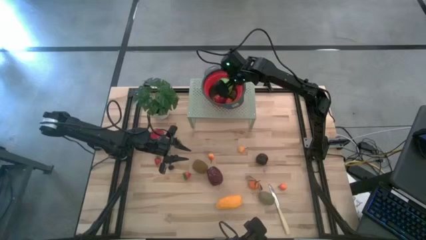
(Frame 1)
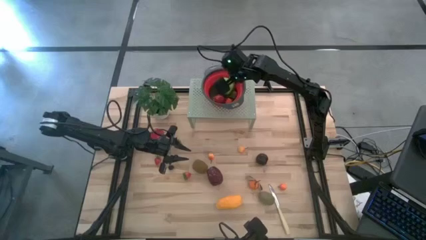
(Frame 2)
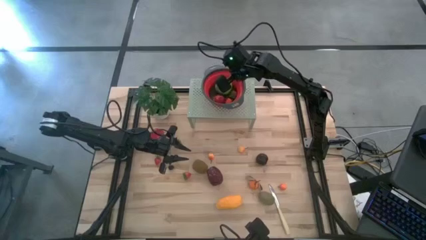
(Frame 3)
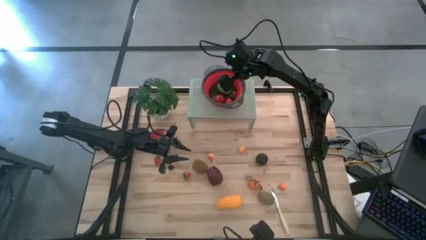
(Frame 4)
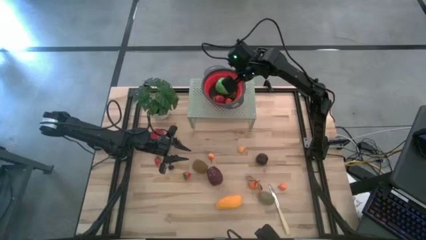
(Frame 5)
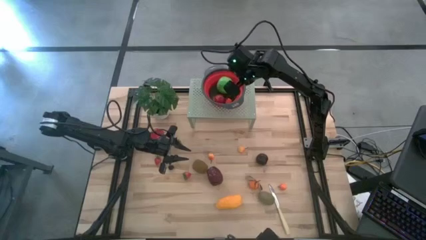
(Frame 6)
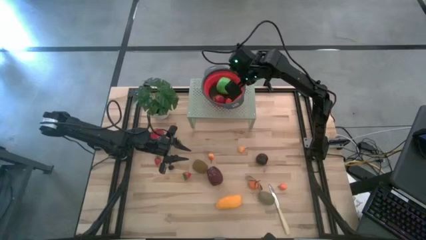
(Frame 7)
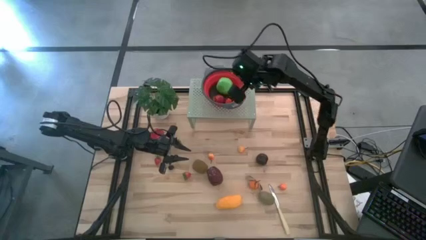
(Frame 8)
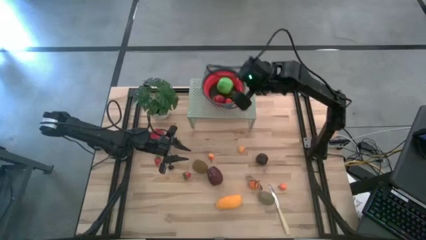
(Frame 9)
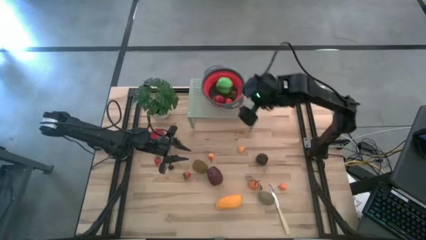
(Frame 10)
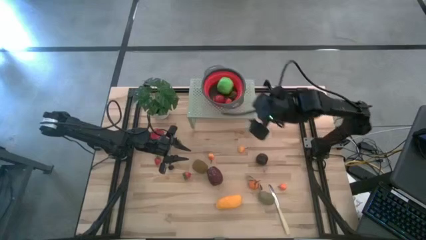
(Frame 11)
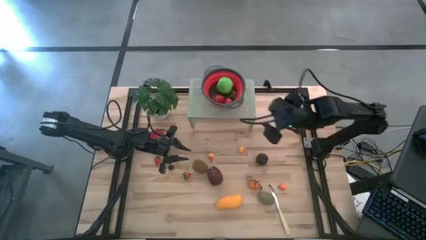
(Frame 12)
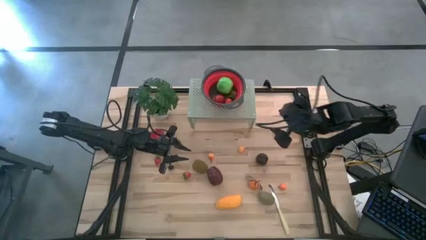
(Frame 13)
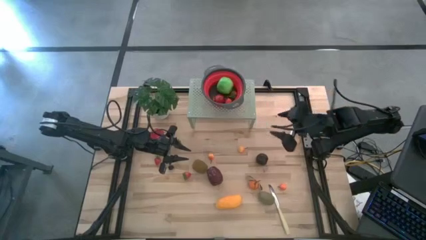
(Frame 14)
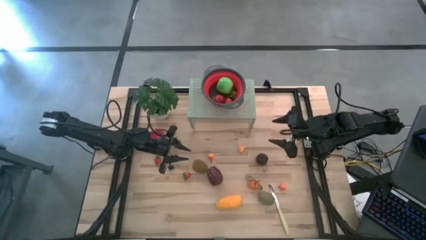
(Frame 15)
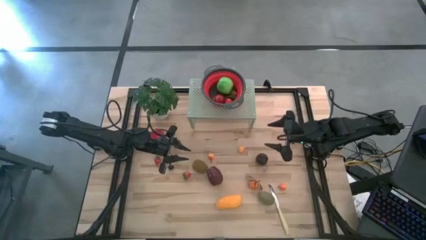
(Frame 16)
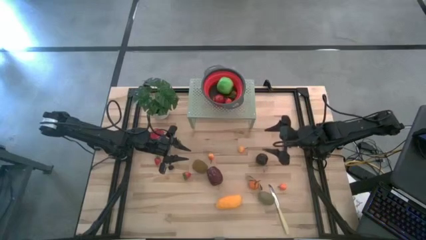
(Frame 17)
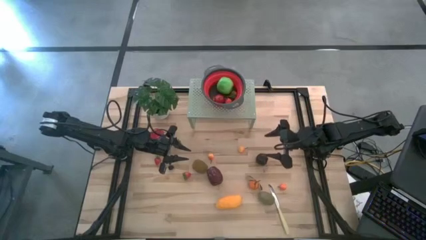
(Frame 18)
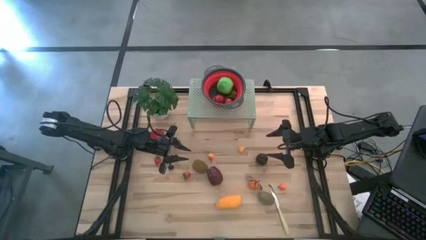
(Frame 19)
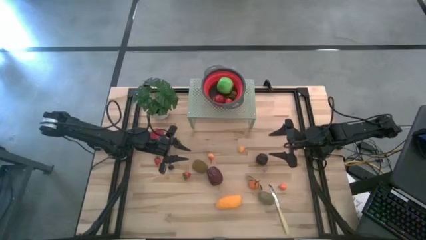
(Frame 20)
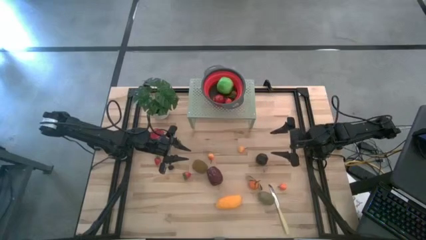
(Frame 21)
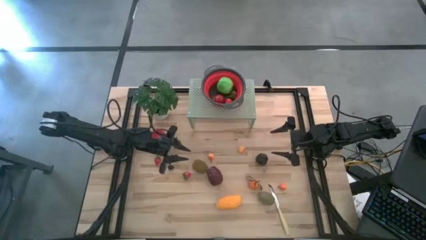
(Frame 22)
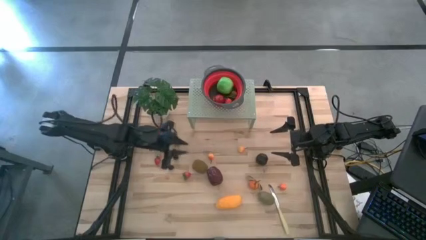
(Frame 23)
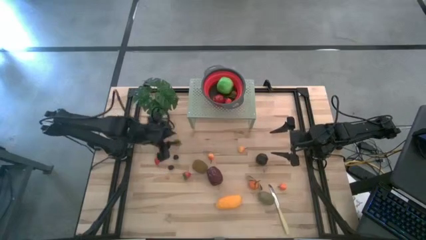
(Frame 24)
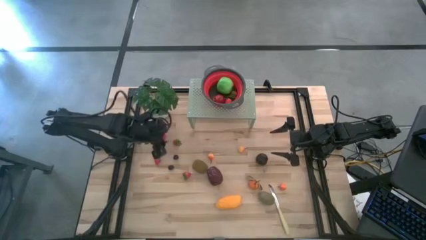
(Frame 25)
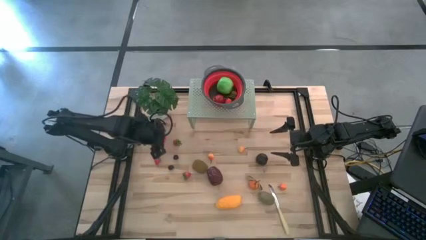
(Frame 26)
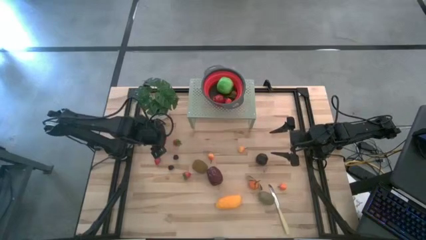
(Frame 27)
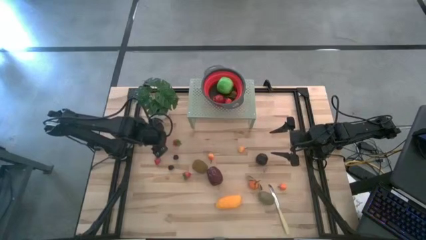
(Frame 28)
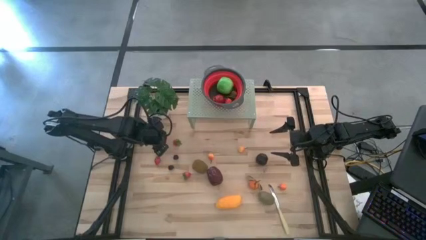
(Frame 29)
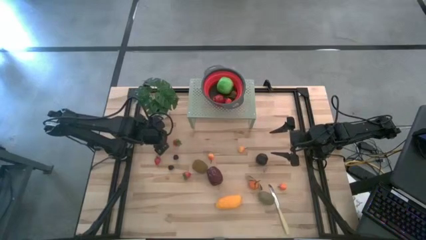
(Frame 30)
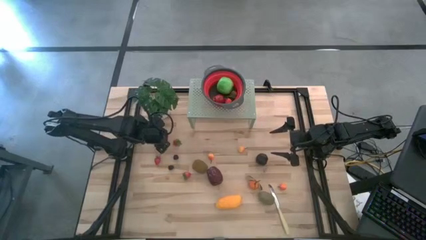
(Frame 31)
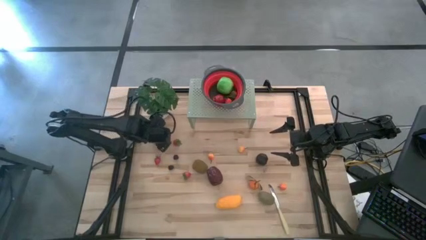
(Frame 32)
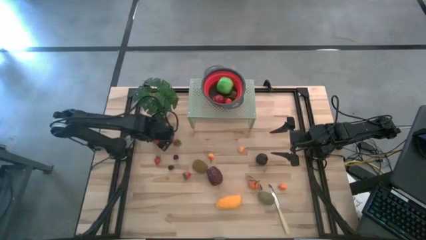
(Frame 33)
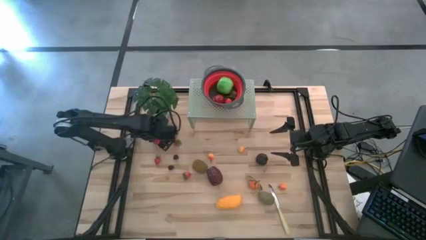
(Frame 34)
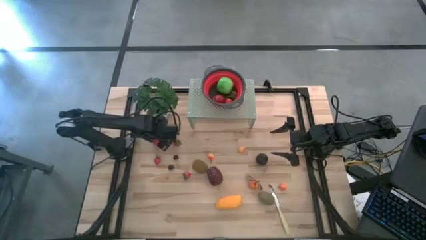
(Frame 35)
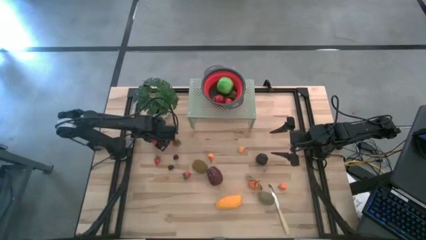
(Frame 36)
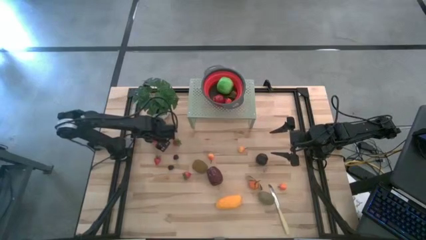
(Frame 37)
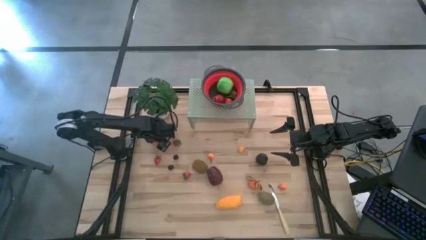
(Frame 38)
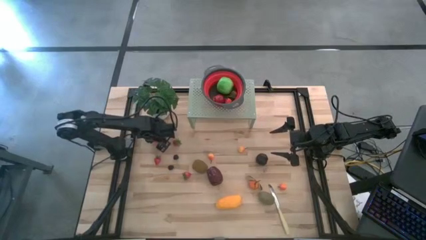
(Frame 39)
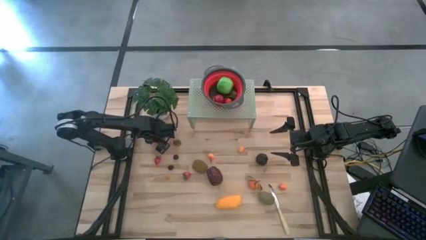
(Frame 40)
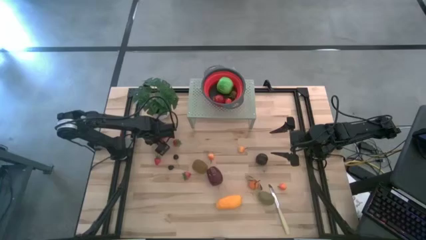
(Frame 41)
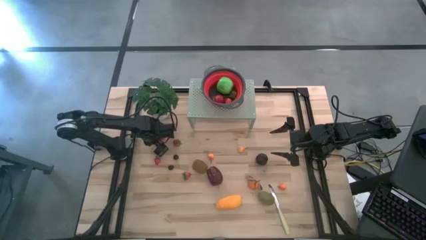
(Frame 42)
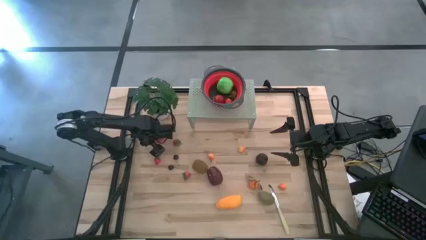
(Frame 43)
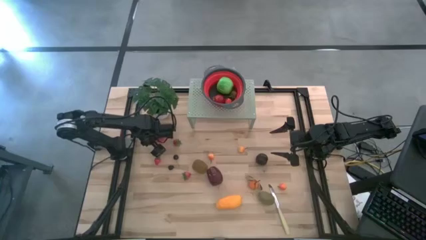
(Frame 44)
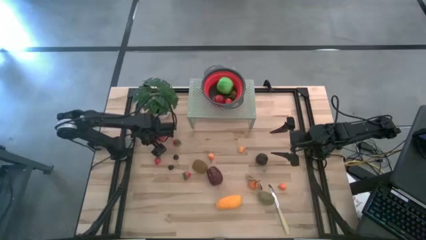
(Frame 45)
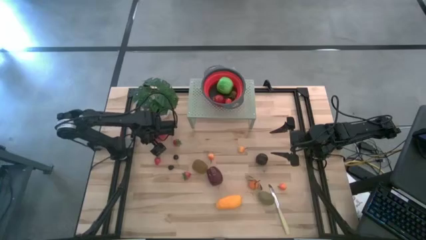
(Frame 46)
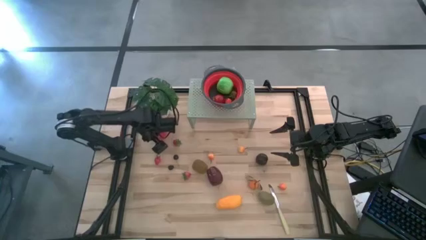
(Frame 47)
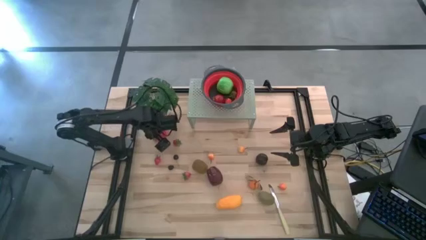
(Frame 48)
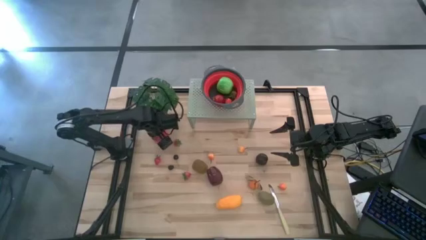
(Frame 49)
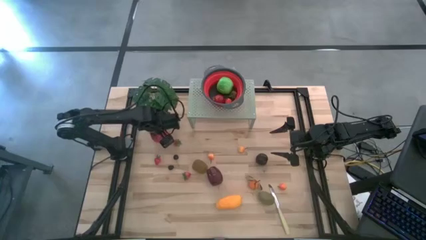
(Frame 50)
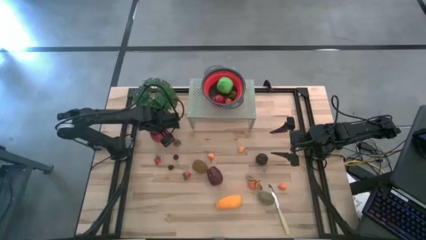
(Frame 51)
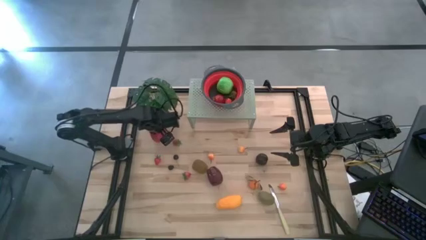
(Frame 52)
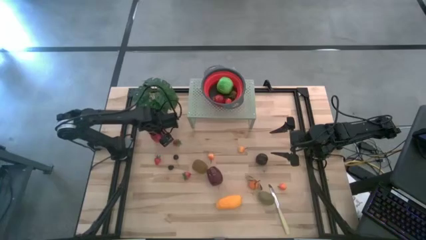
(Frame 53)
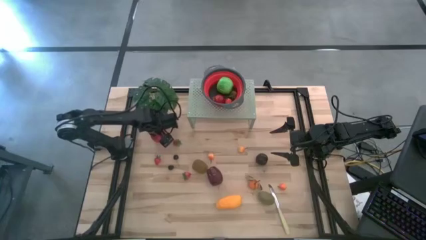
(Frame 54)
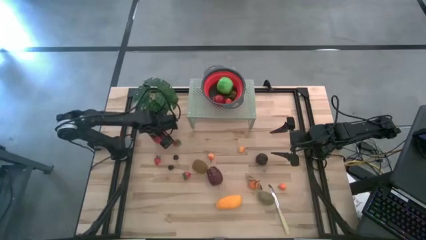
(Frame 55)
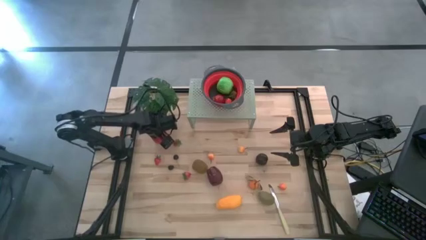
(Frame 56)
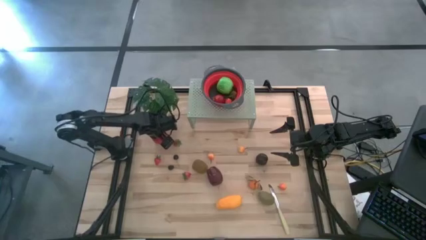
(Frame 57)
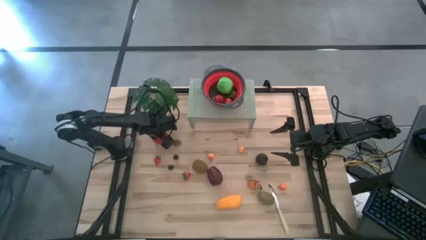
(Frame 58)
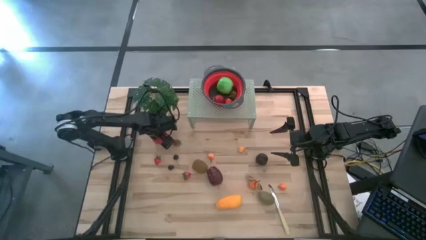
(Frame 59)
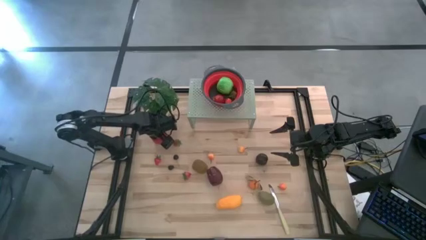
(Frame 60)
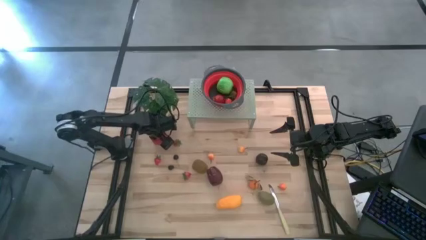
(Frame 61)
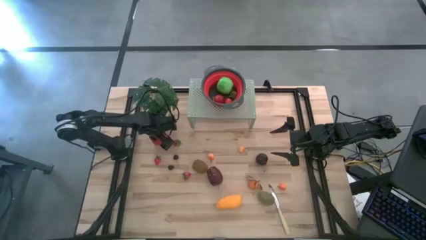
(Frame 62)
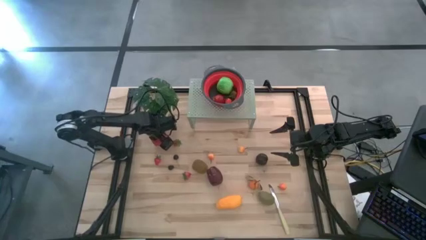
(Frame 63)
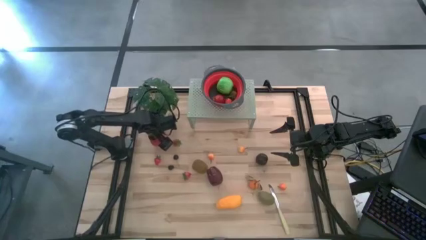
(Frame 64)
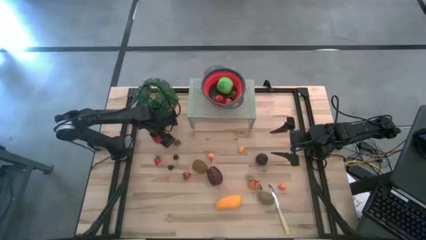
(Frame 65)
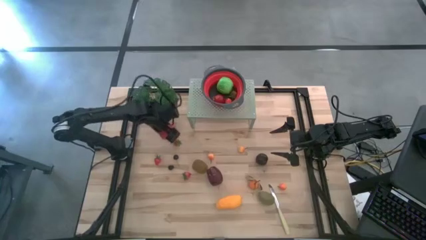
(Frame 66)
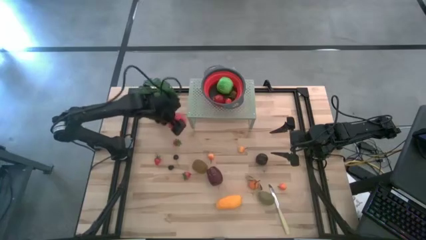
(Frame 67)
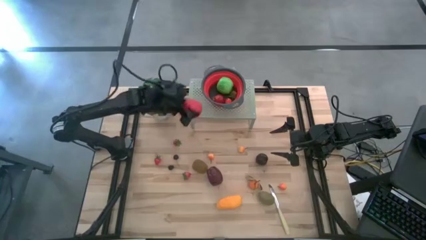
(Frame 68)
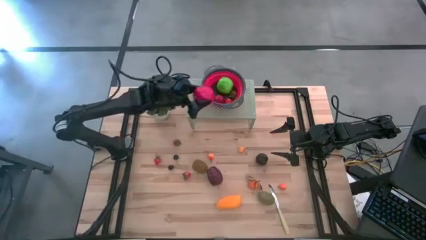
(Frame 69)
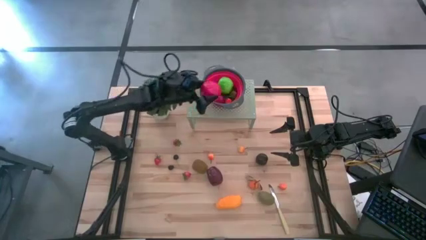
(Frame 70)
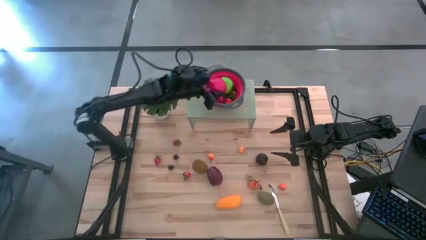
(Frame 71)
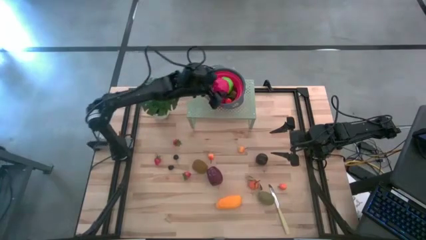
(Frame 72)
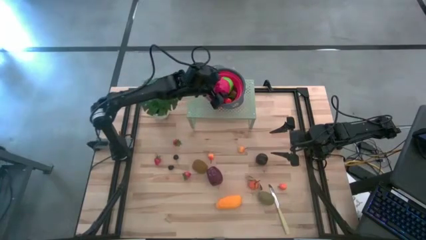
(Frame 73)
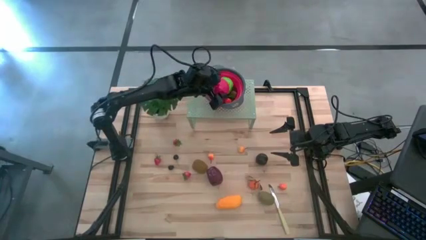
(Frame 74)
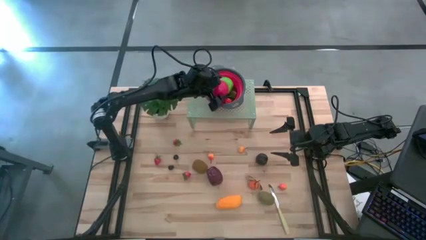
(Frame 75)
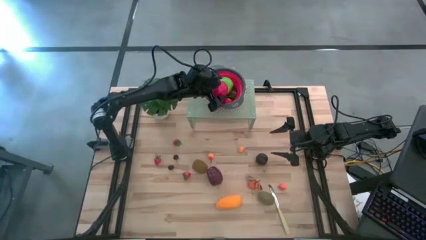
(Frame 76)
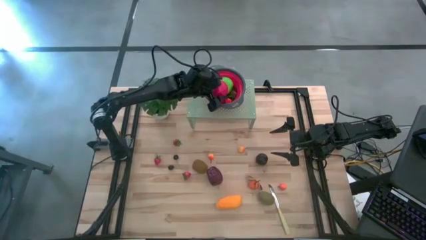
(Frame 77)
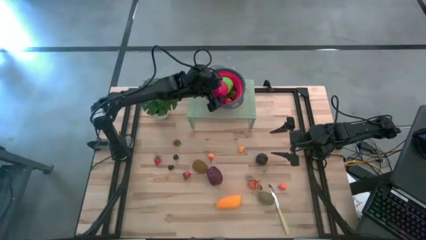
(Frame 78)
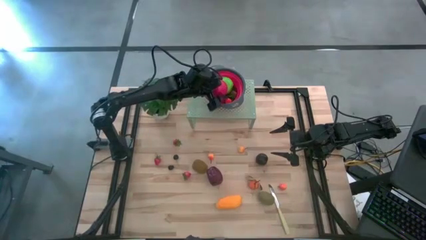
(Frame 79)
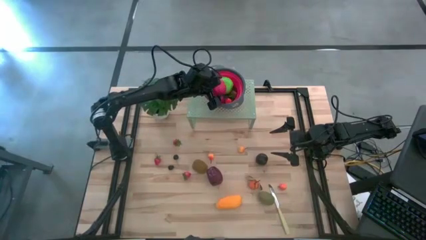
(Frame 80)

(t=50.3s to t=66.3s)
Task: Pick & Place Fruit
Put the apple into the red strainer bowl on the shelf
